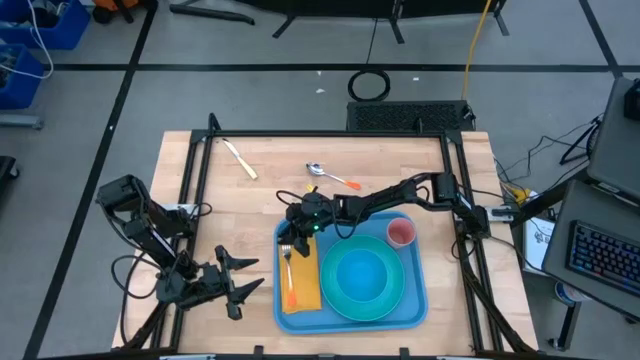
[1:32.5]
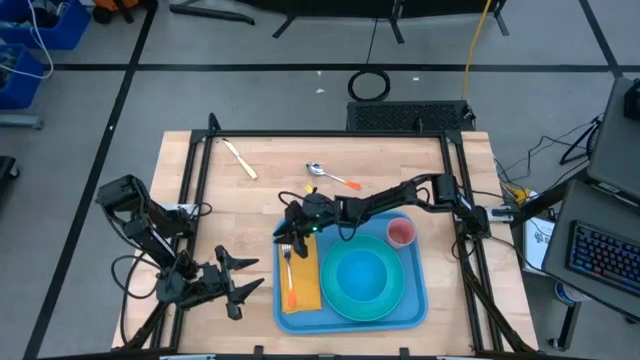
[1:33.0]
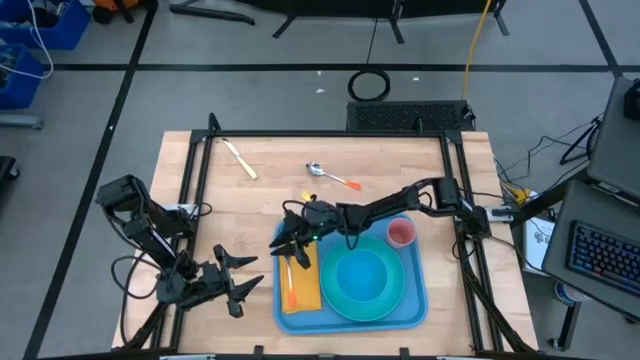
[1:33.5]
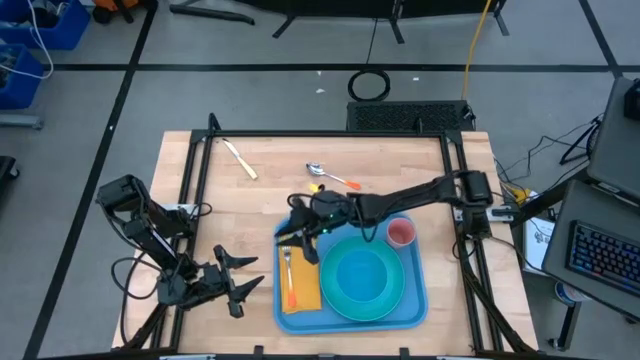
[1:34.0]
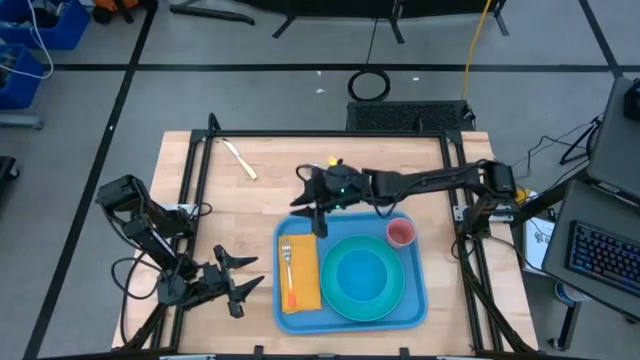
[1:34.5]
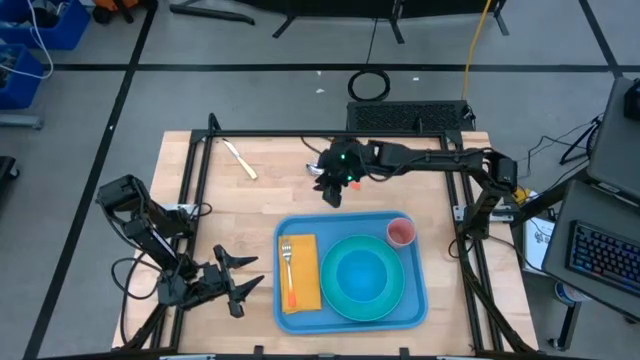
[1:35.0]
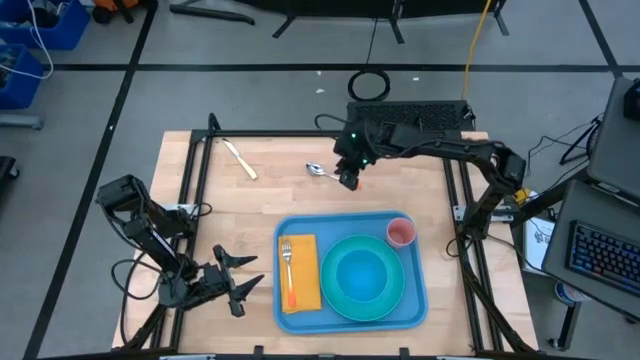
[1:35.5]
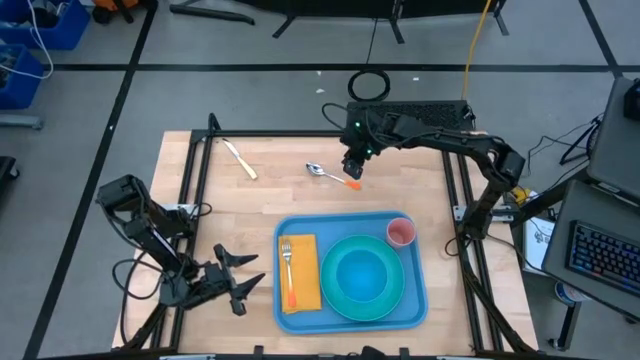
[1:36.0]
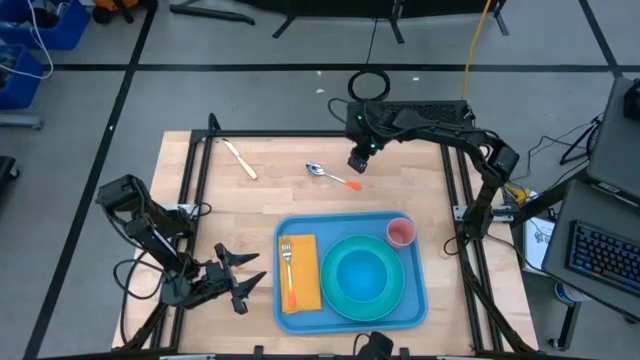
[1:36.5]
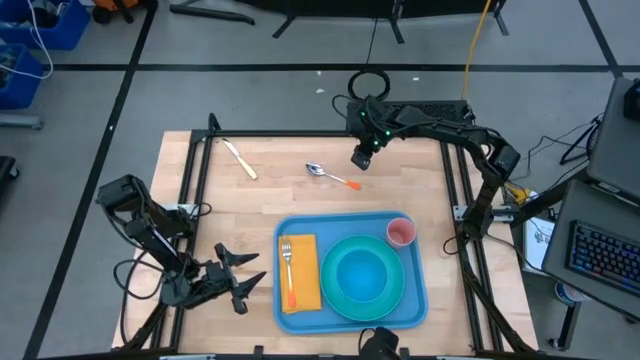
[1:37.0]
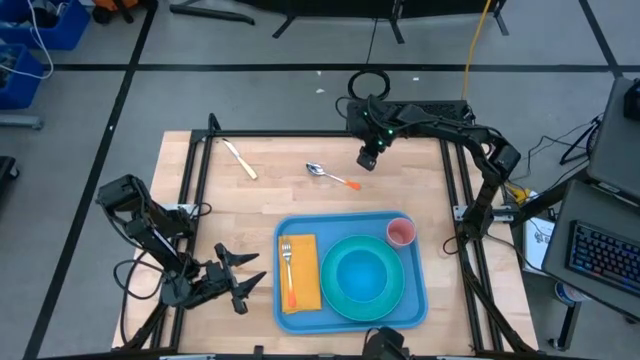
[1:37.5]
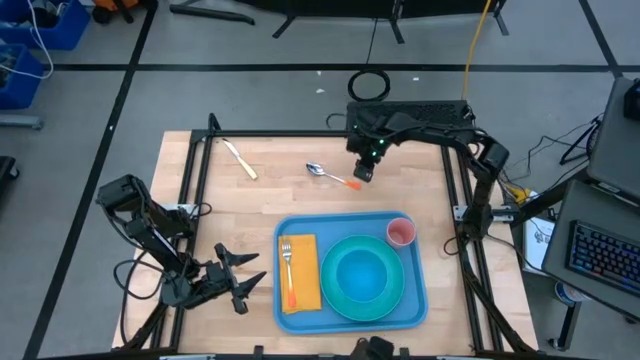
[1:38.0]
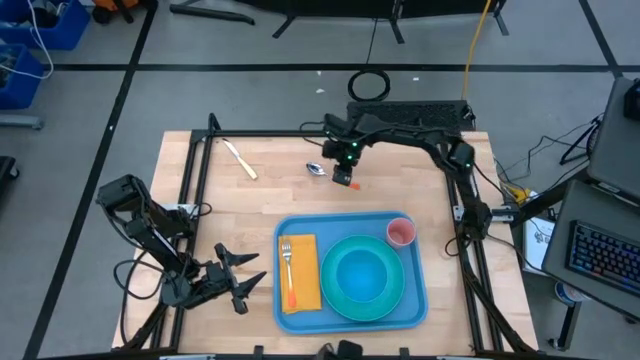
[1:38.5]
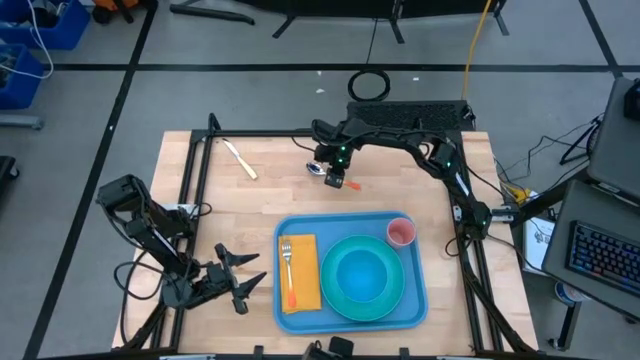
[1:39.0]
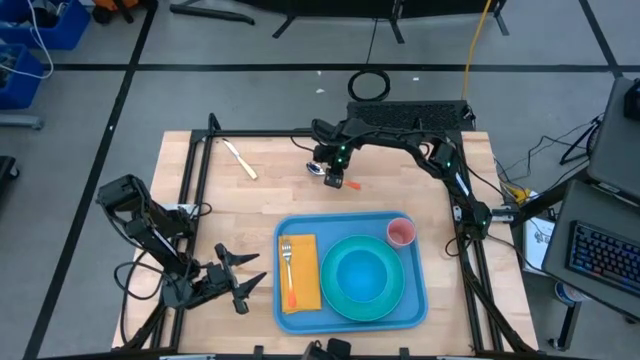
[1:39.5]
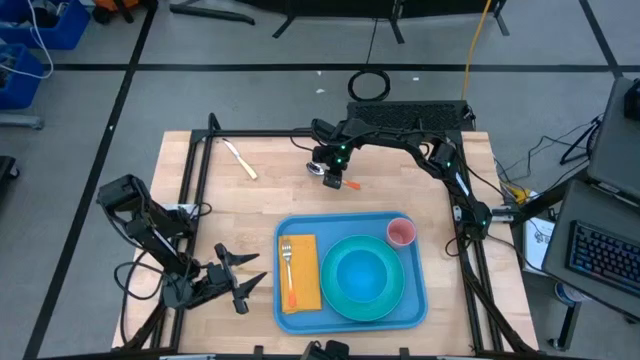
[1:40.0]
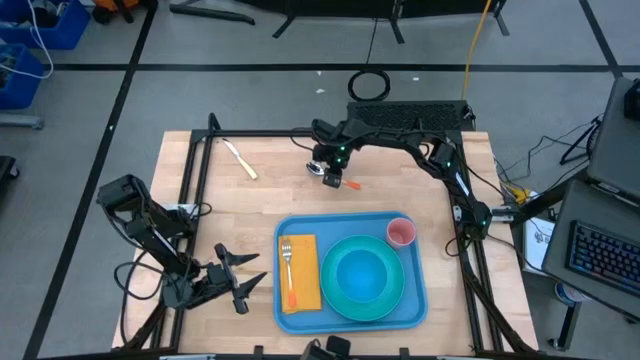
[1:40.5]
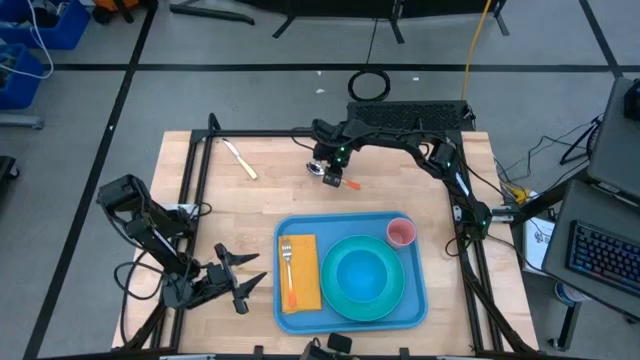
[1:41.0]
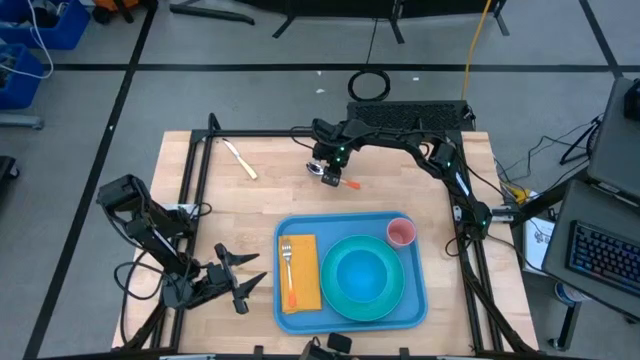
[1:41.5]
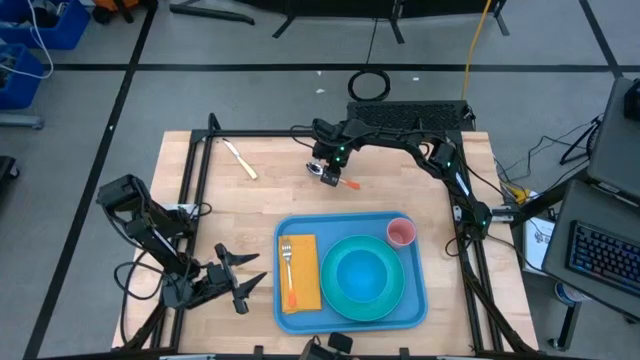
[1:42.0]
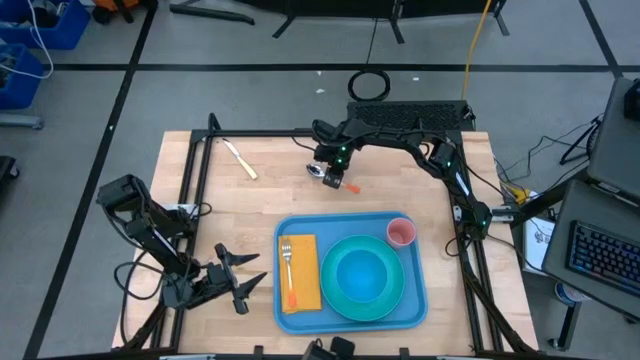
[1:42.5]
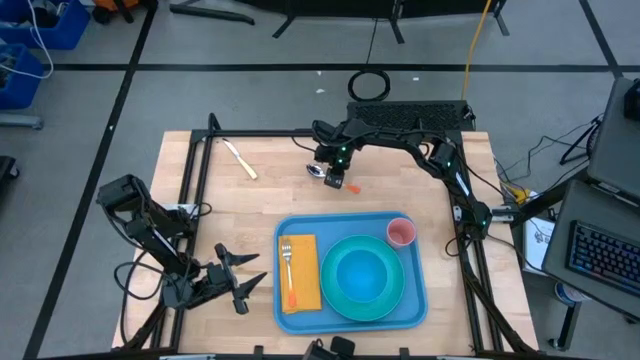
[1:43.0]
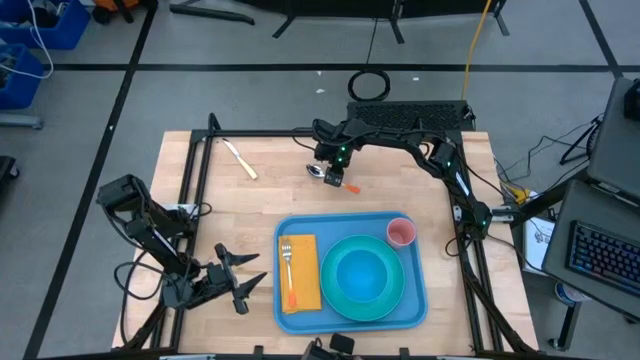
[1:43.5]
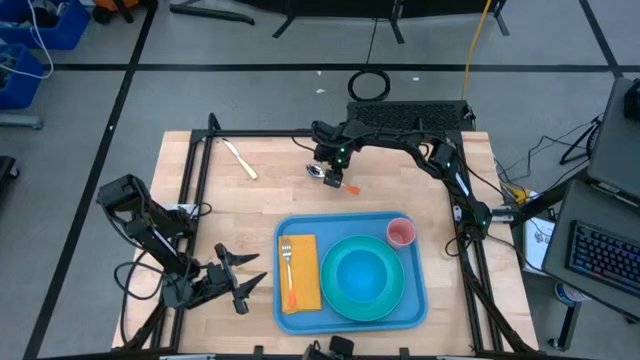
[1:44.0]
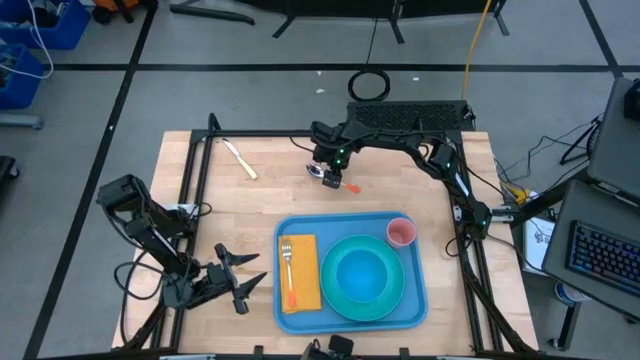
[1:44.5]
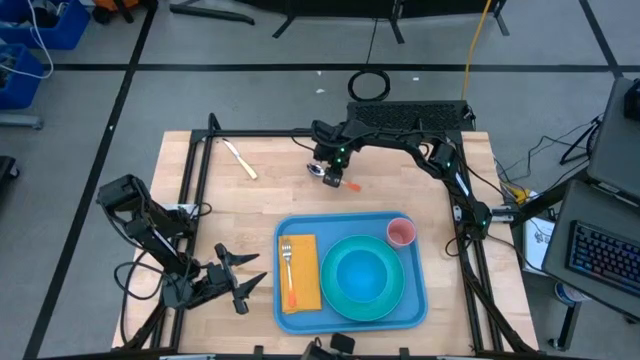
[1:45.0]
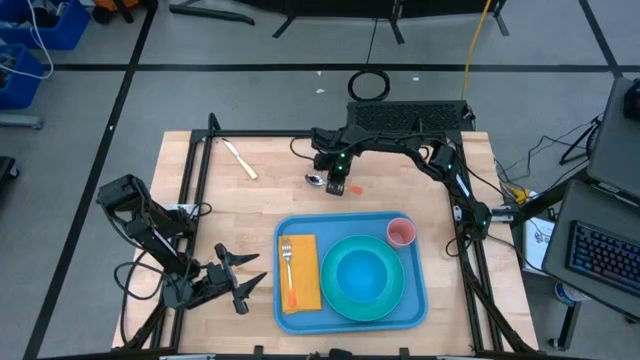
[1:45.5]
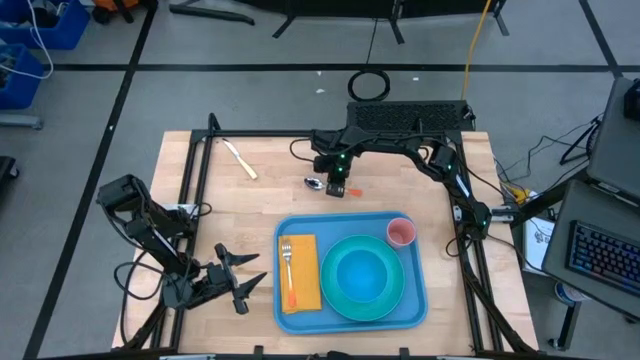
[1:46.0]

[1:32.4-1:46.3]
Task: Set up tray
Put the orange spoon on the yellow napkin to the right of the orange fork

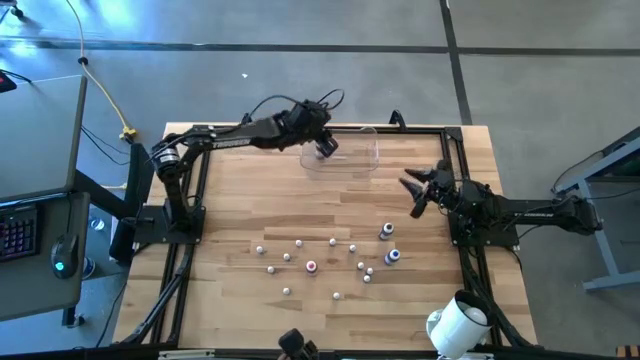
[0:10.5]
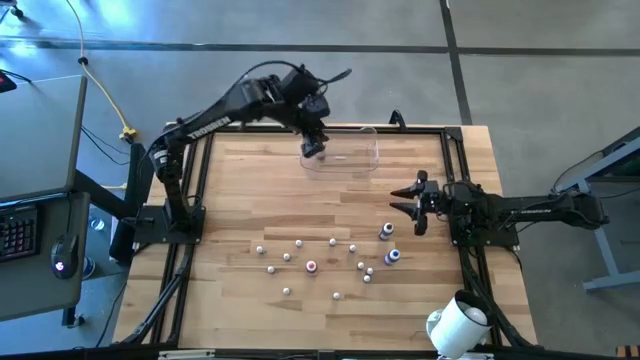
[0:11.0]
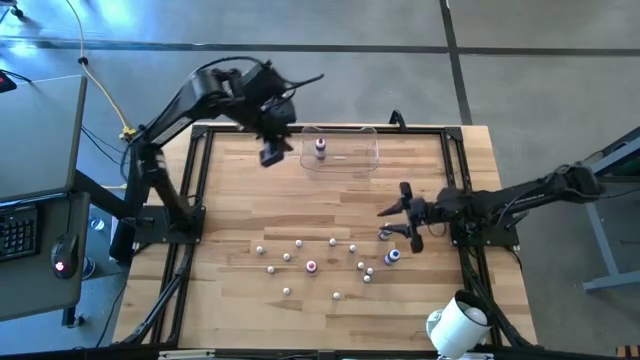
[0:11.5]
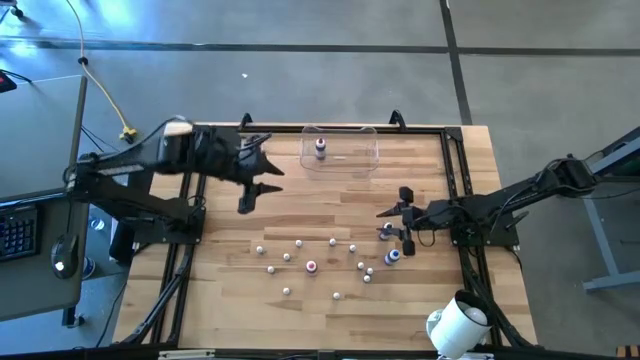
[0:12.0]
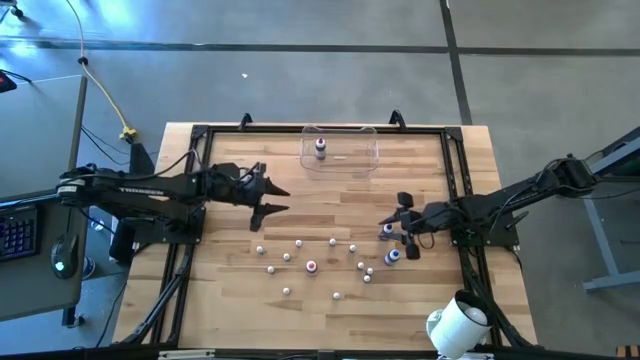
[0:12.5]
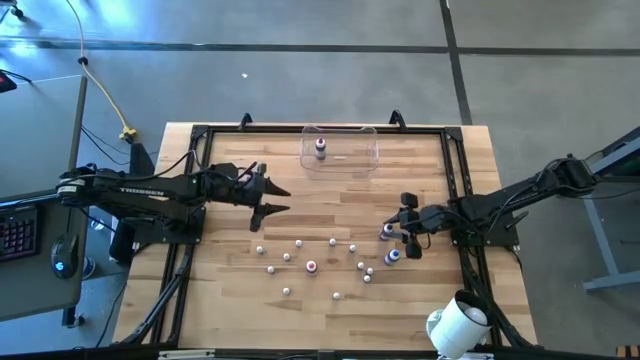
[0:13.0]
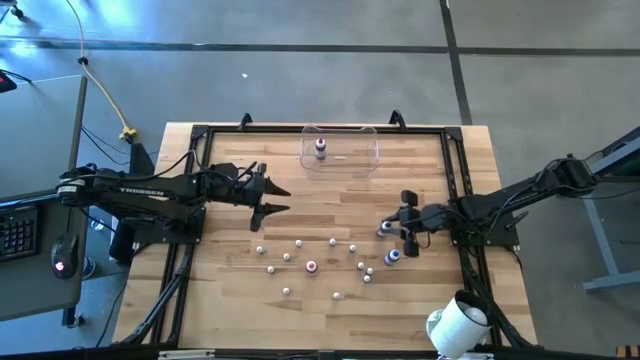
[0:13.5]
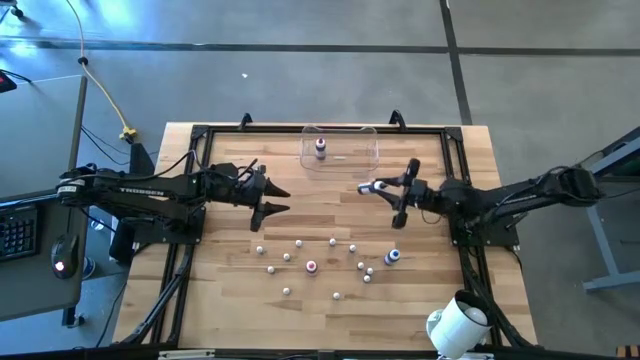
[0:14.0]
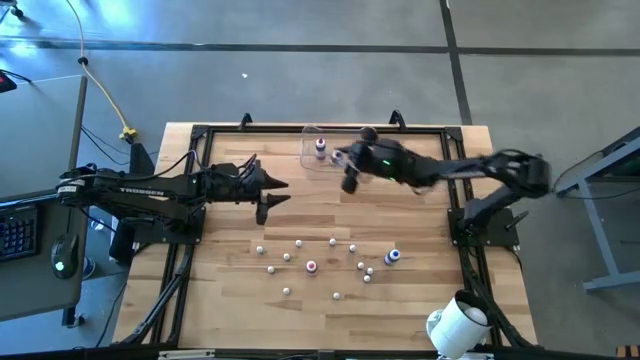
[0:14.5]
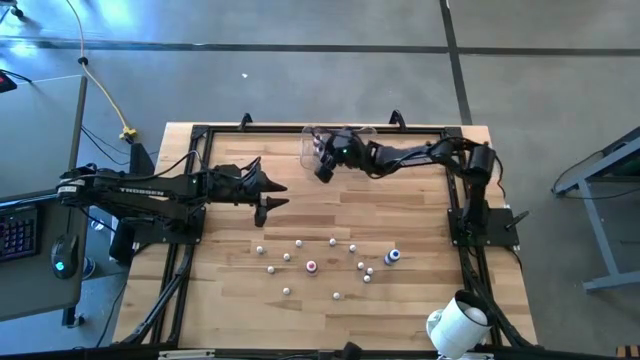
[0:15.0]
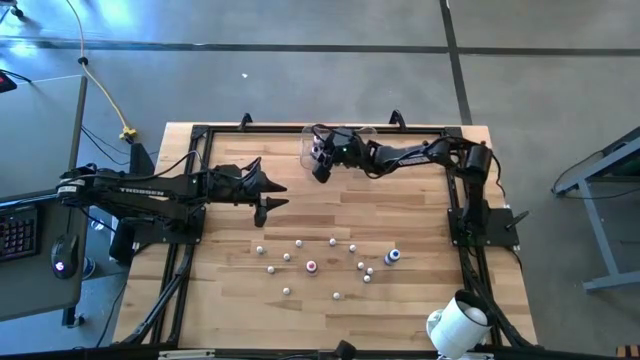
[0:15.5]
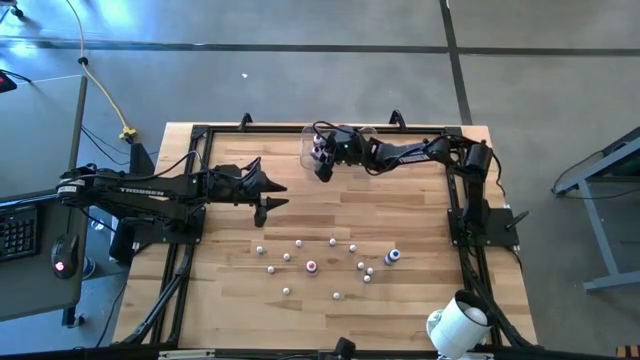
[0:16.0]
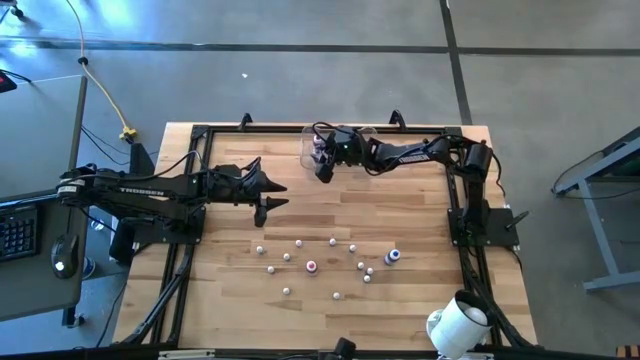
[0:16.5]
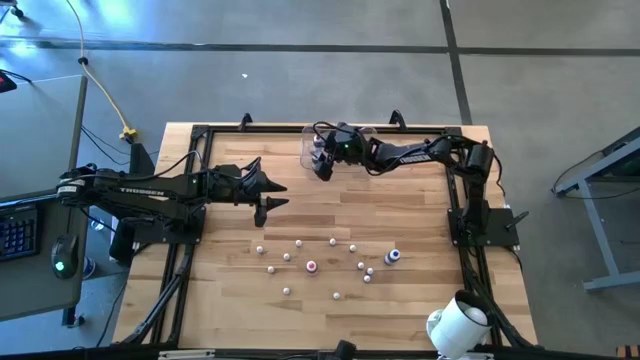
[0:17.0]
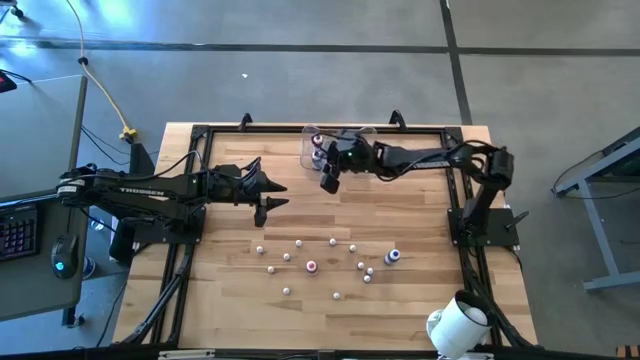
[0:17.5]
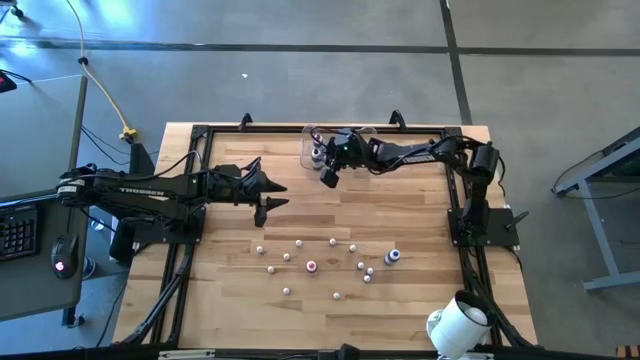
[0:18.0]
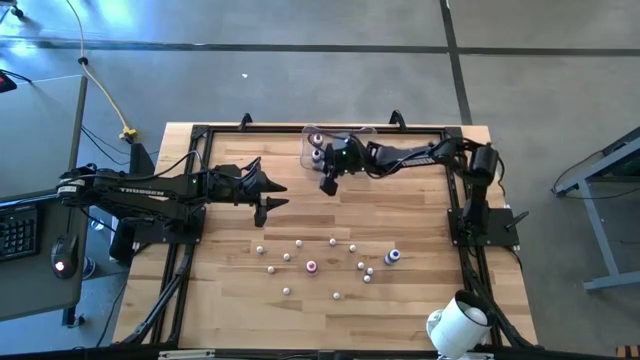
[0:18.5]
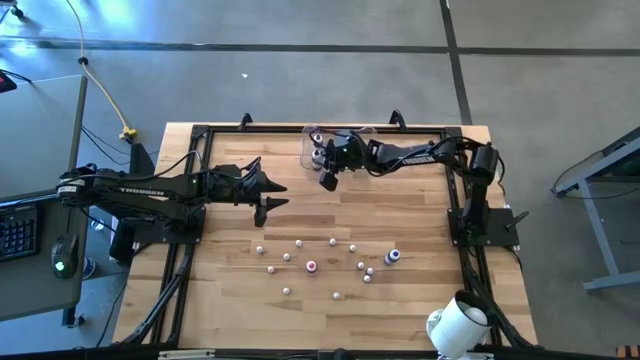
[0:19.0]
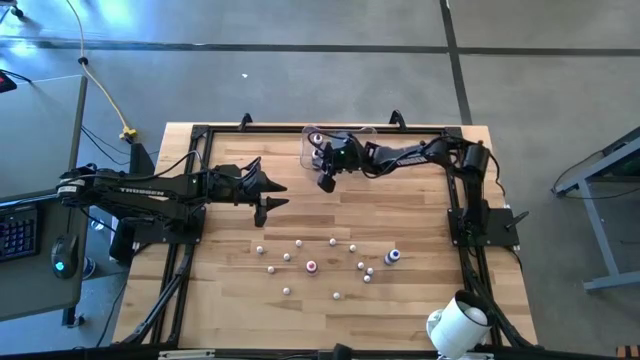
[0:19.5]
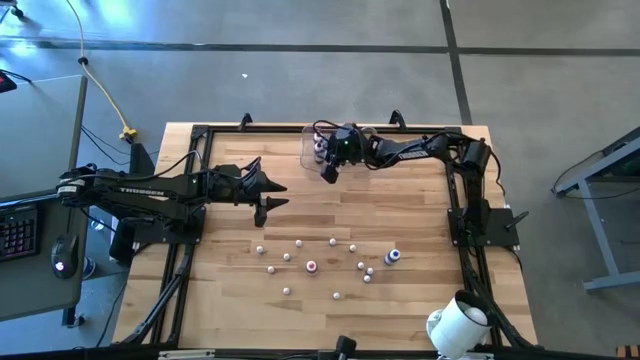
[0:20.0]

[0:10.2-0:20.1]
Task: Pick & Place food coloring
Put the black food coloring into the transparent bin
